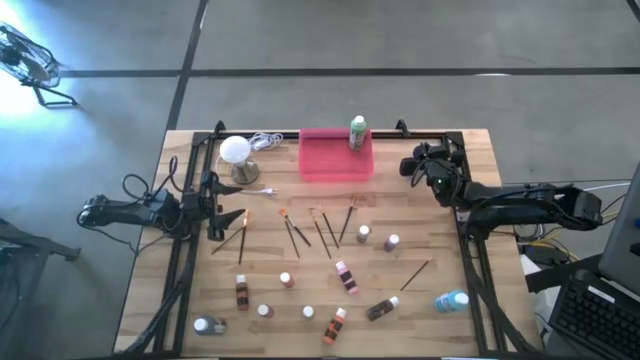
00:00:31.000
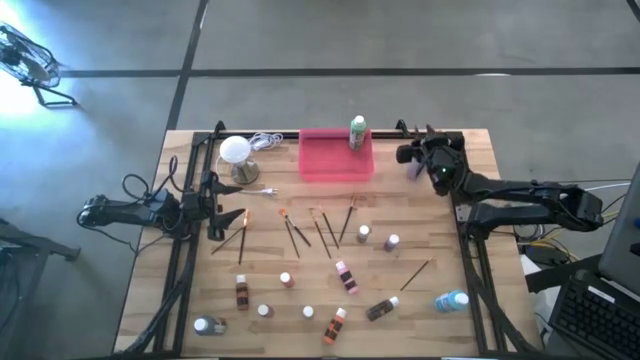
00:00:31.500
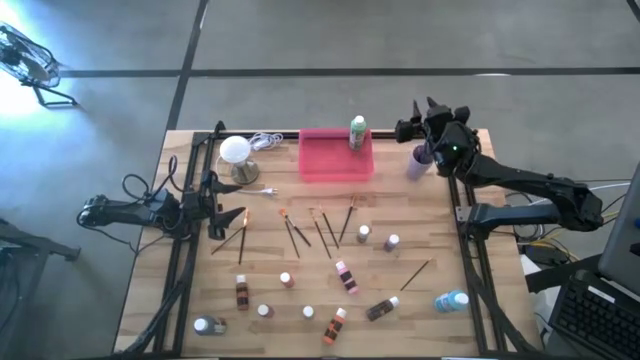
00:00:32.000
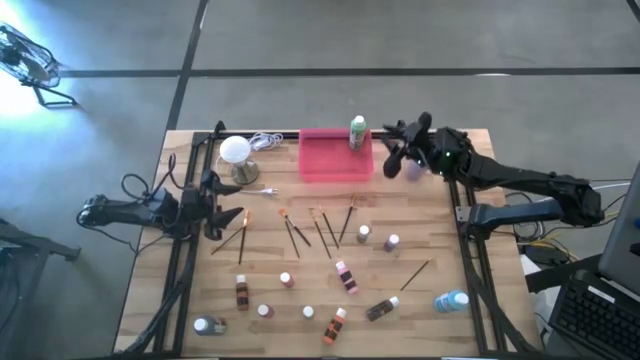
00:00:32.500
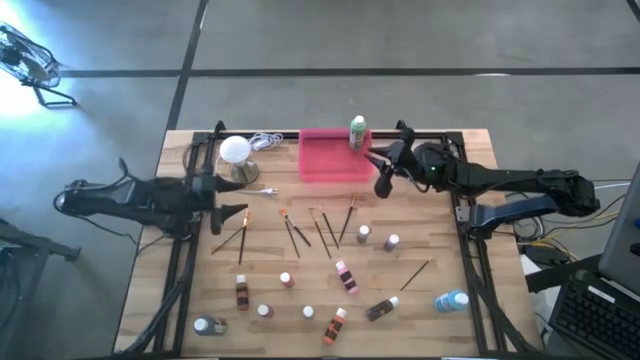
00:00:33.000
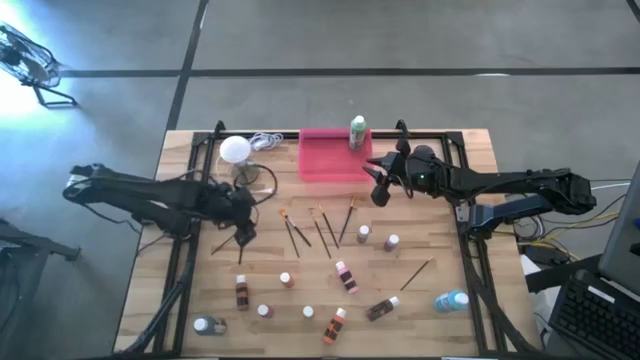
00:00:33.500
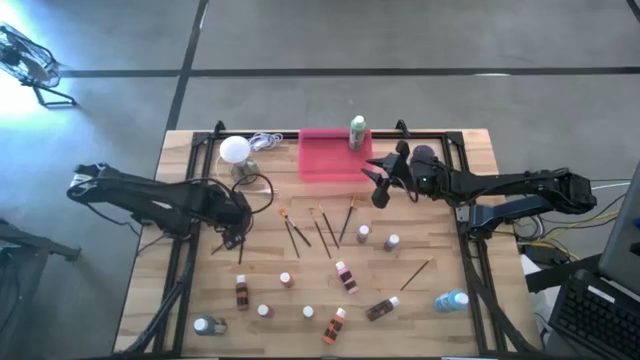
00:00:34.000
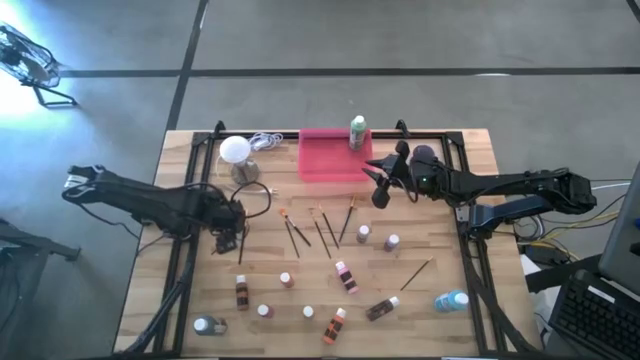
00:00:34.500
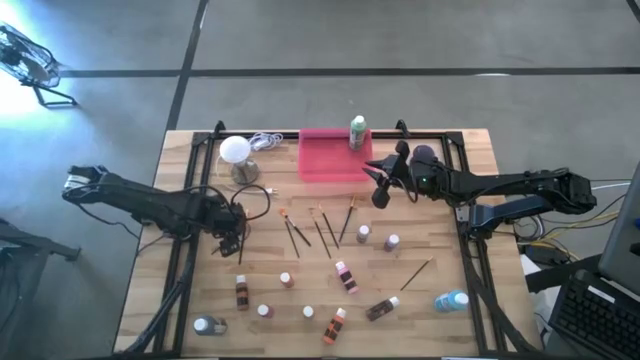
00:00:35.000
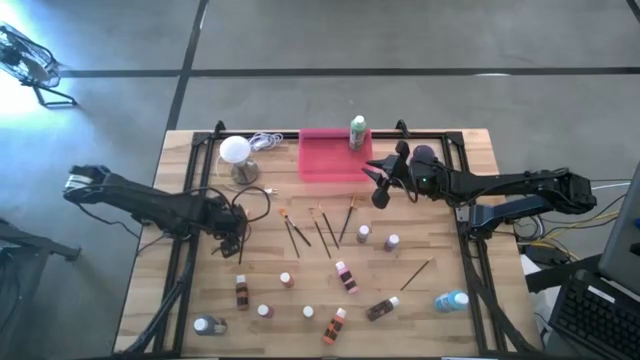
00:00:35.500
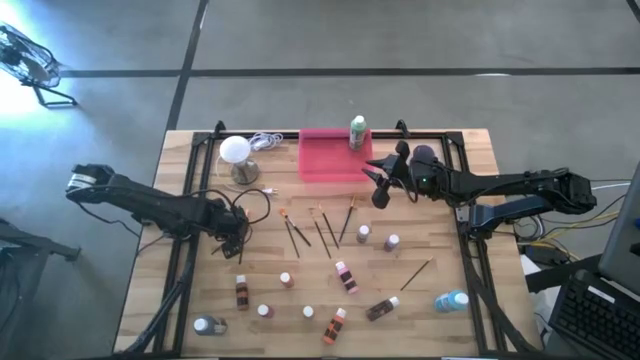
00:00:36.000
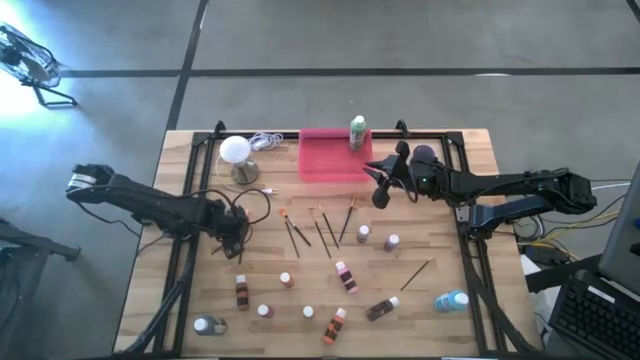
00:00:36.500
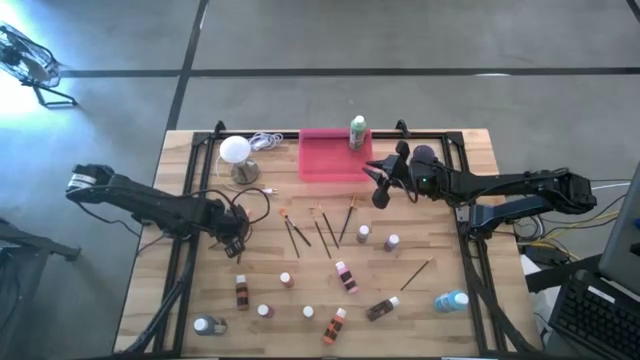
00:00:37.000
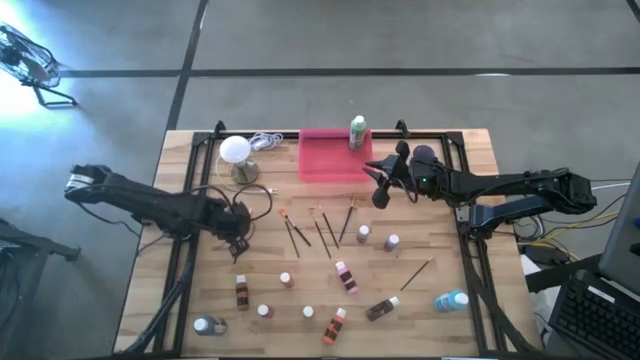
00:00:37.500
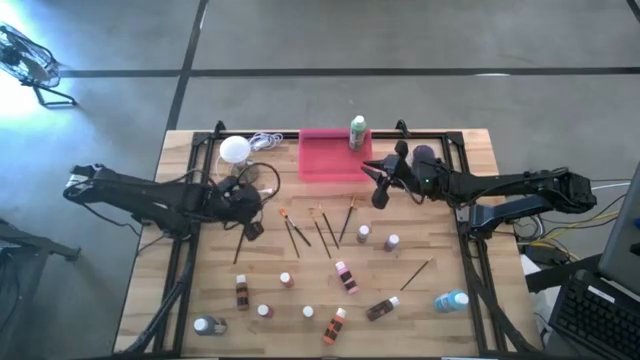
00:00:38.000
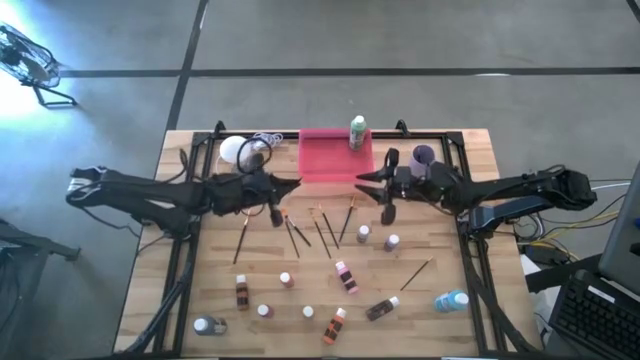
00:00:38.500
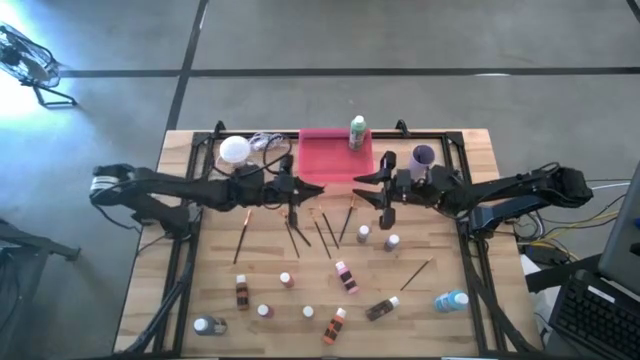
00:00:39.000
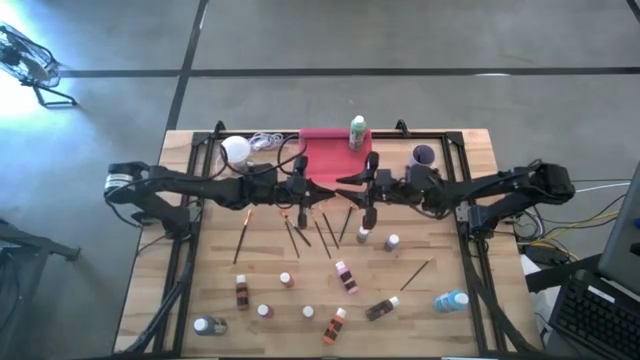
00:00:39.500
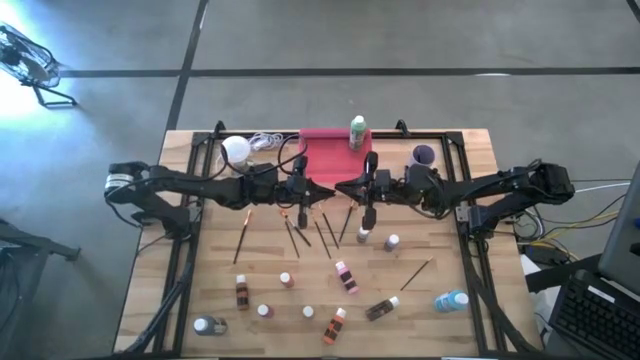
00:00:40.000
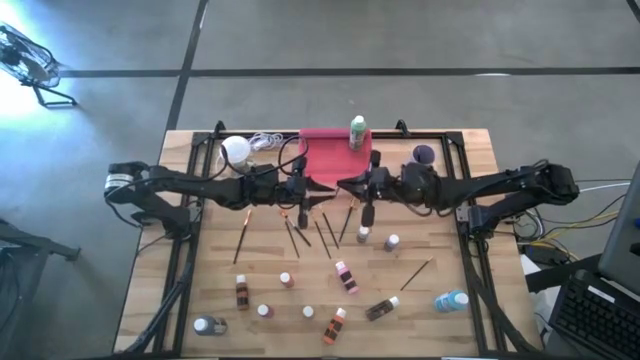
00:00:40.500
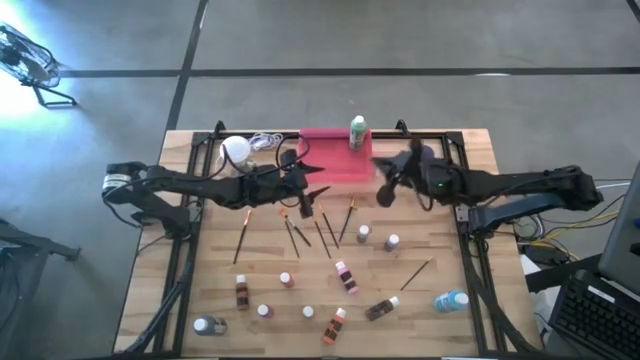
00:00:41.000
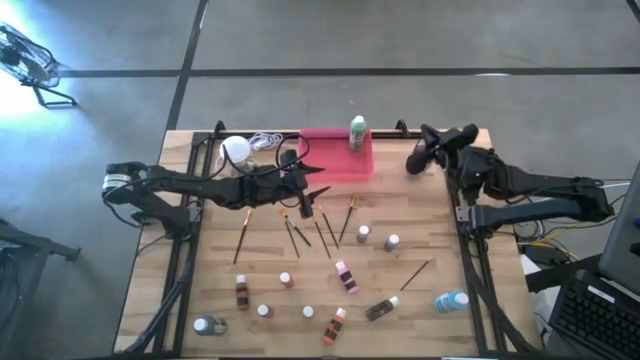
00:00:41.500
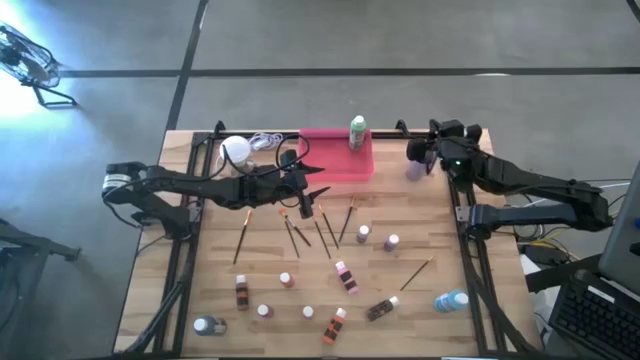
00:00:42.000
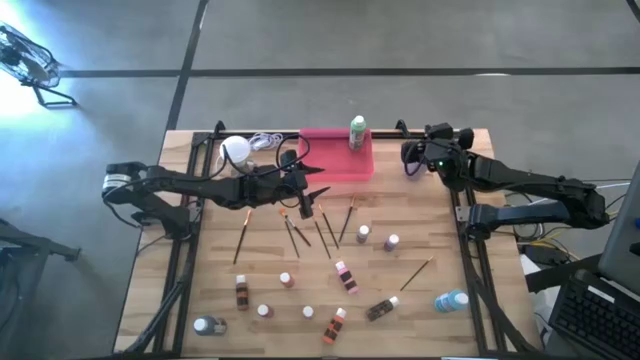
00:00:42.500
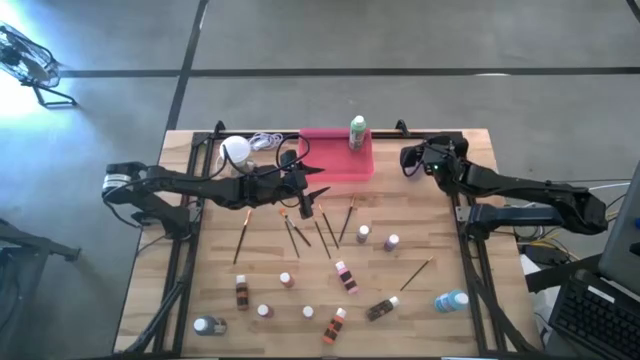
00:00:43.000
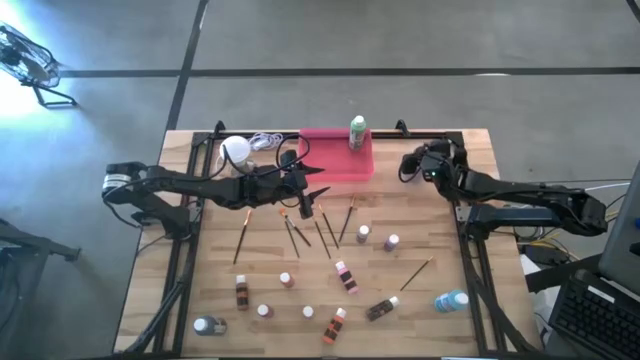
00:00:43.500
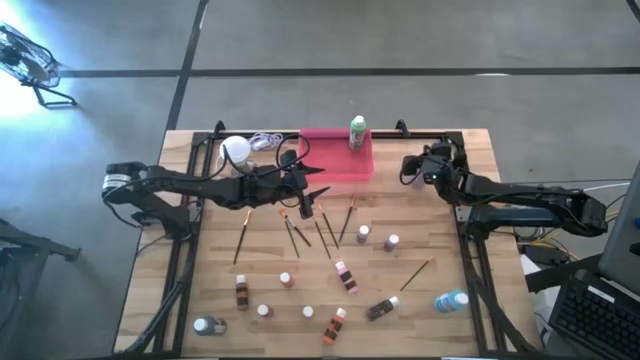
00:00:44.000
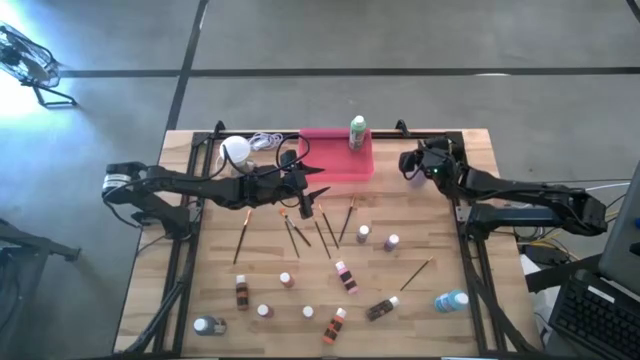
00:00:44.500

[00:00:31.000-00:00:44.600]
Task: Pick & Place Paint Supplies
Put the black gold paint brush into the violet cup

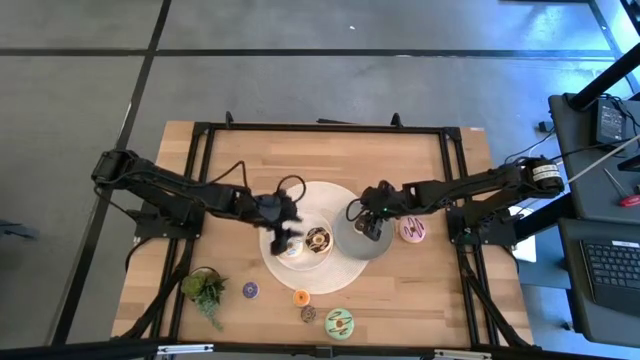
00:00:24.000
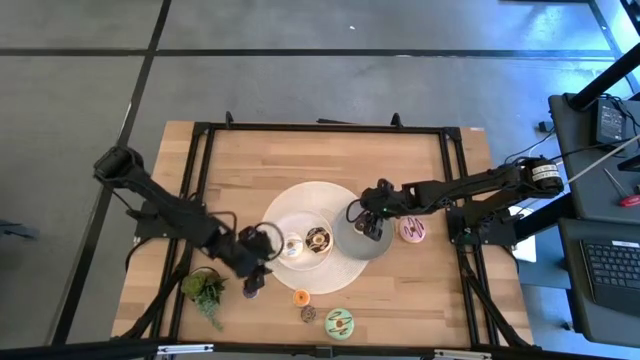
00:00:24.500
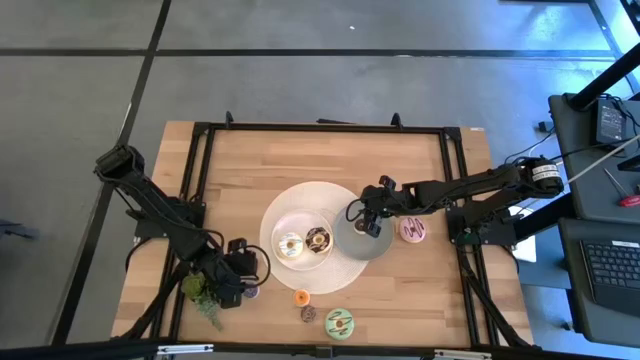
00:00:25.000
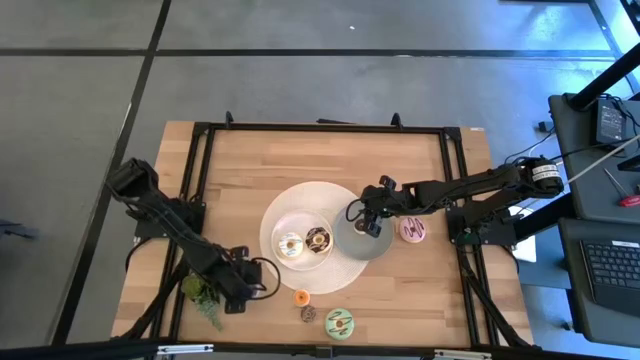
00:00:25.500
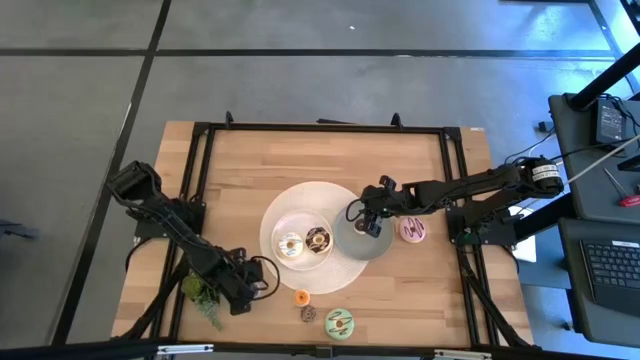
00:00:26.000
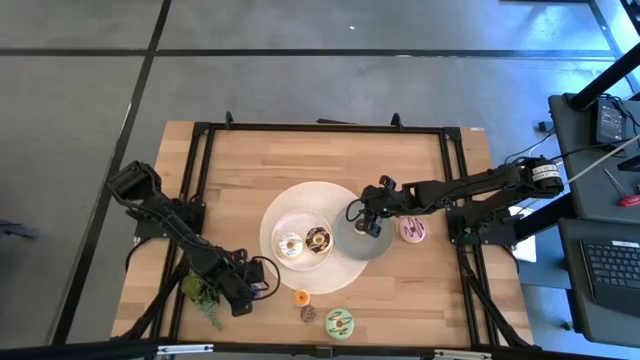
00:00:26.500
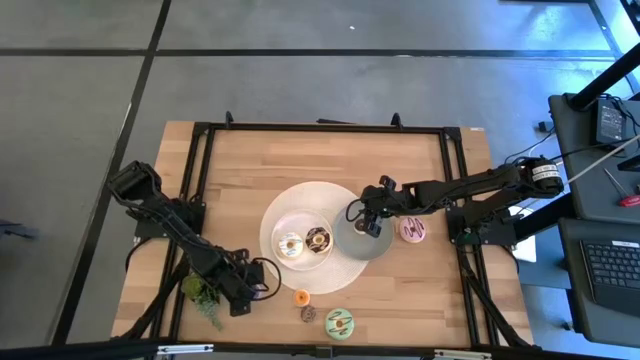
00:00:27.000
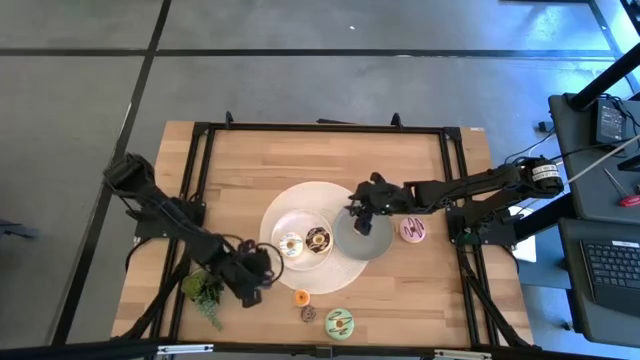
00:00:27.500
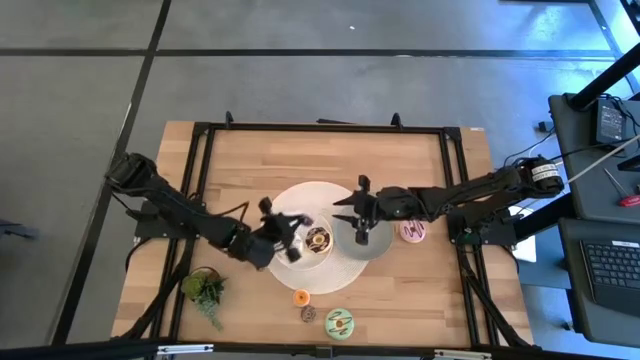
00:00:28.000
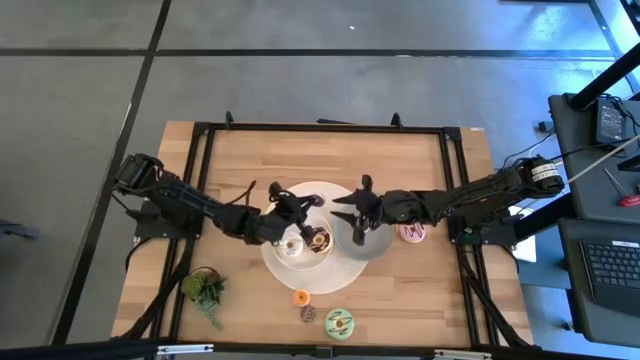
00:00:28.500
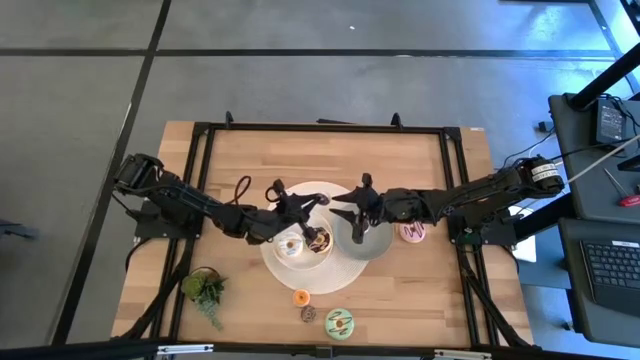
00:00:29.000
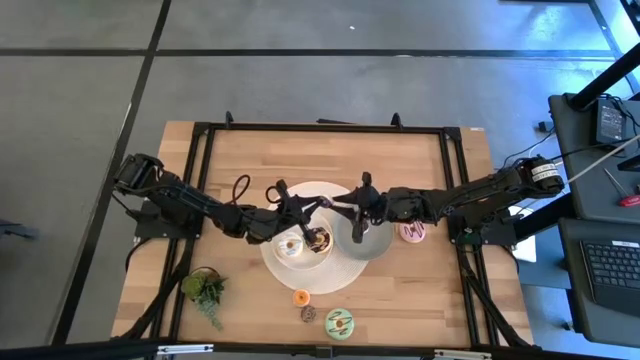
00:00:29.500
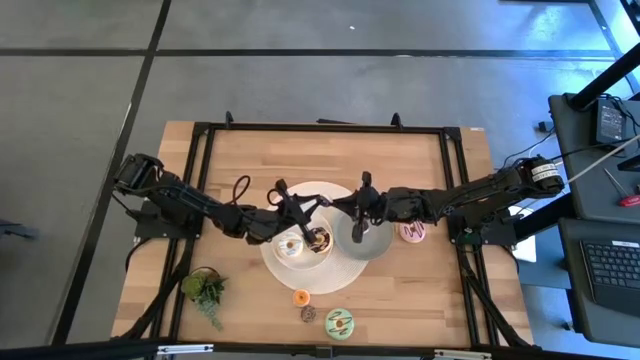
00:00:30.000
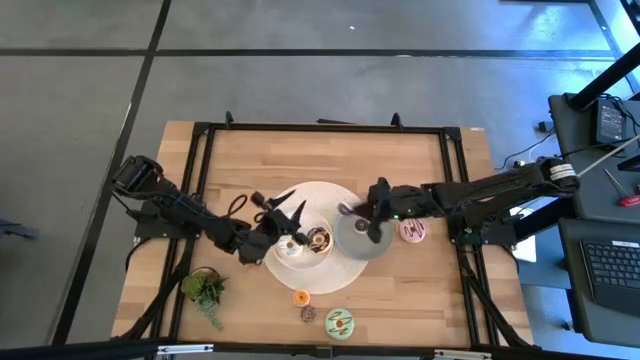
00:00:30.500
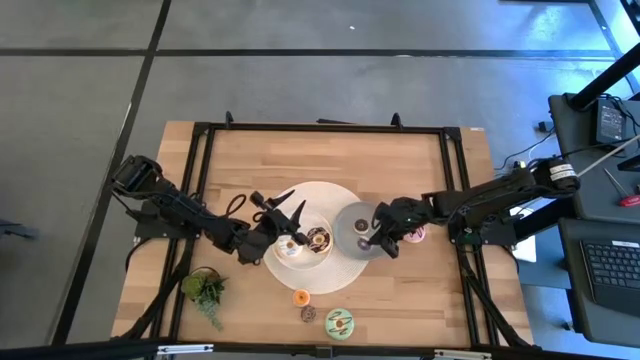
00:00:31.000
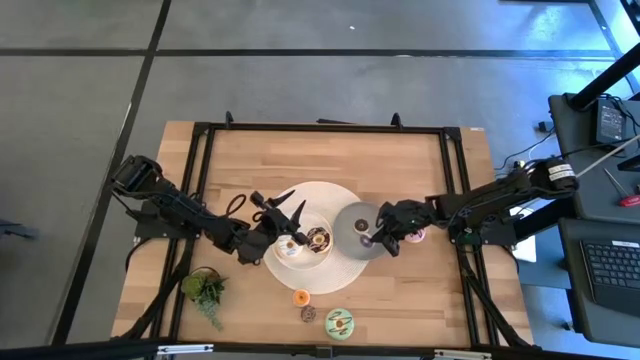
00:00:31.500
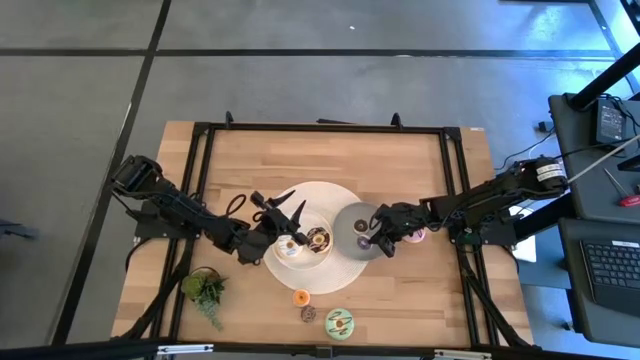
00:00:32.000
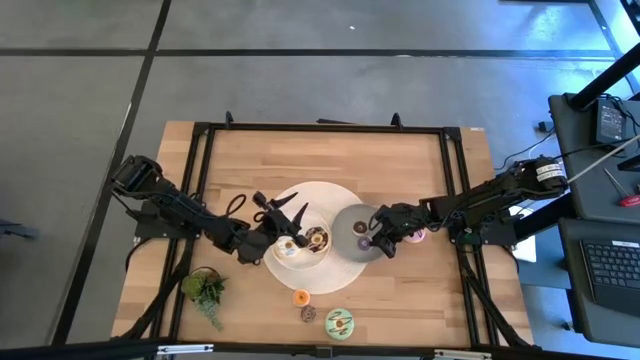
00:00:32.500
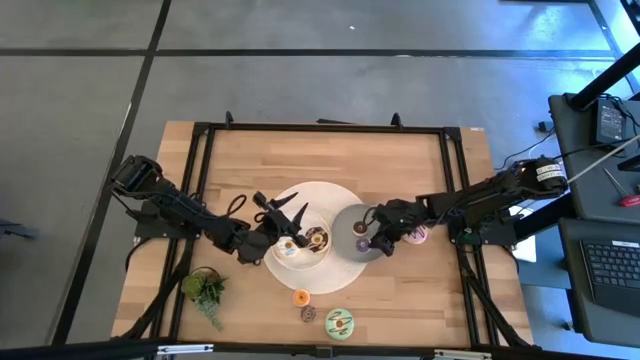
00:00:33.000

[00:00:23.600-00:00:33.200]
Task: Pick & Place donuts
Put the small purple donut on the gray plate
